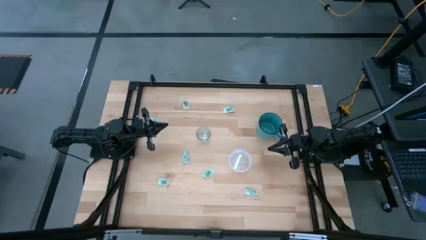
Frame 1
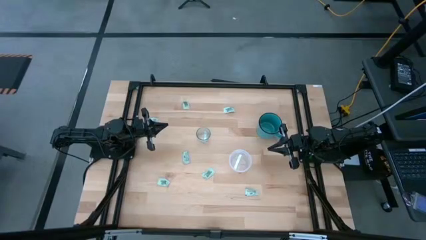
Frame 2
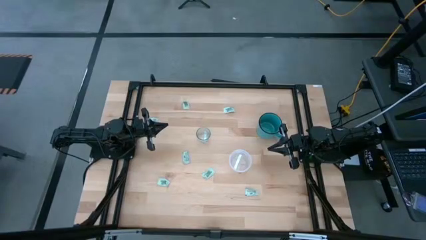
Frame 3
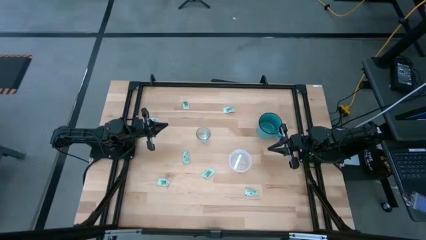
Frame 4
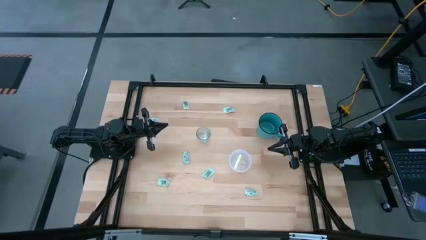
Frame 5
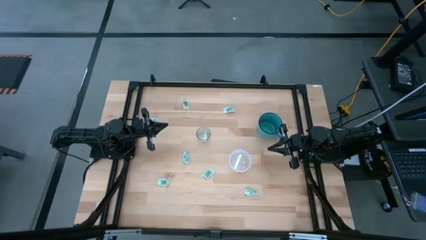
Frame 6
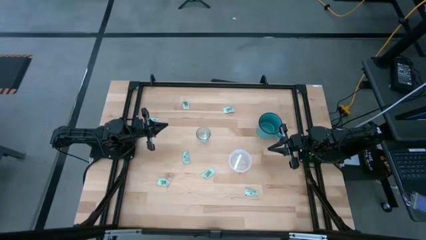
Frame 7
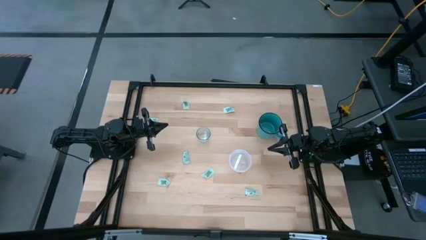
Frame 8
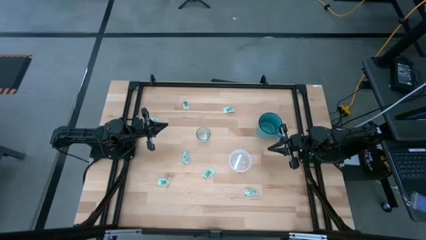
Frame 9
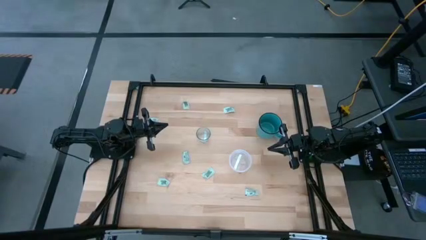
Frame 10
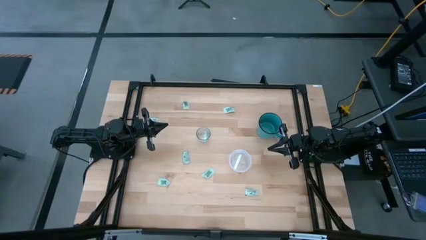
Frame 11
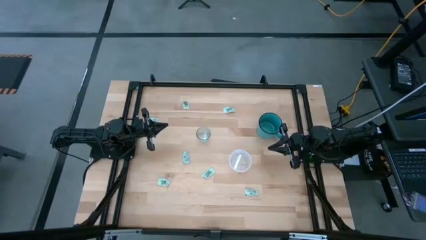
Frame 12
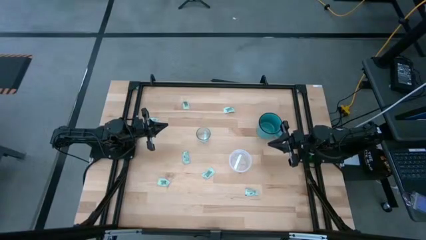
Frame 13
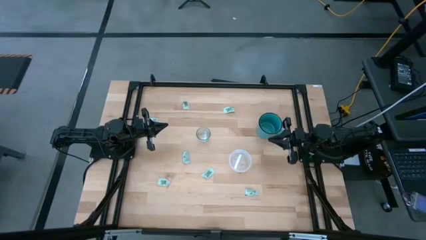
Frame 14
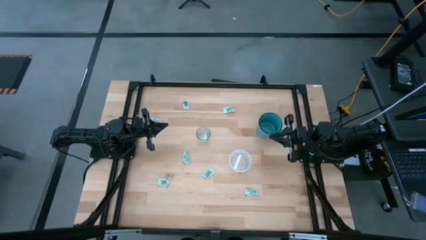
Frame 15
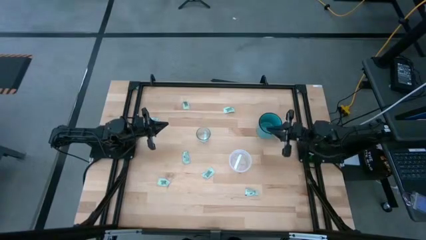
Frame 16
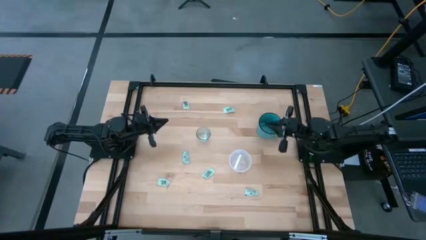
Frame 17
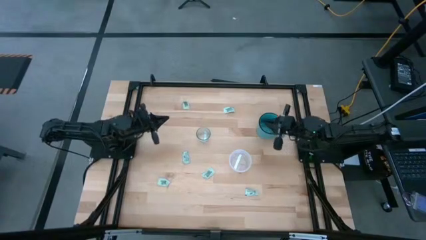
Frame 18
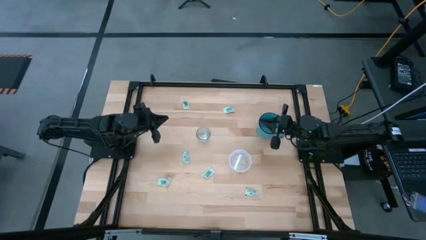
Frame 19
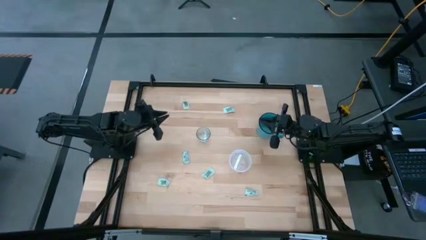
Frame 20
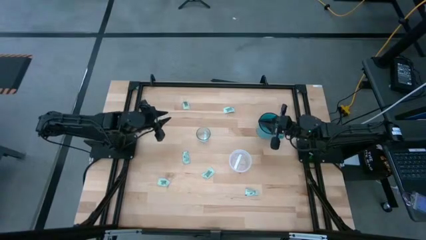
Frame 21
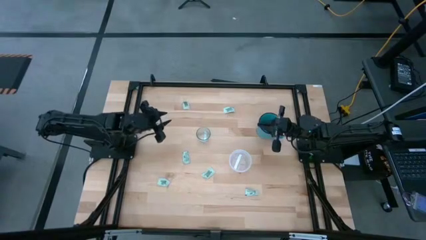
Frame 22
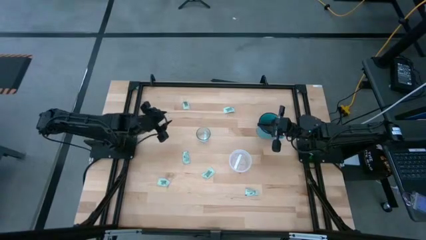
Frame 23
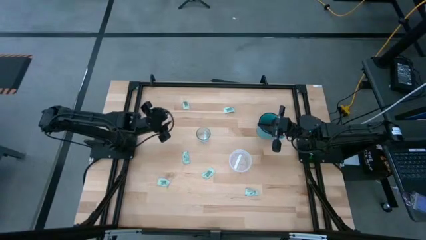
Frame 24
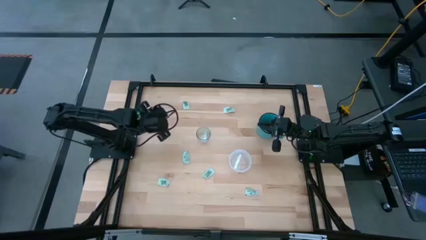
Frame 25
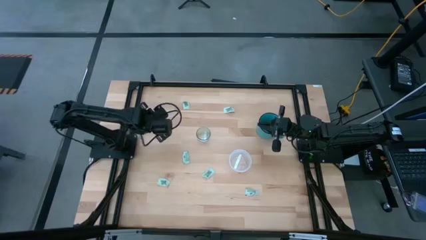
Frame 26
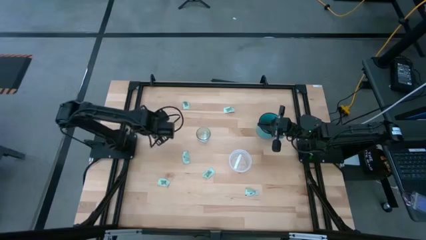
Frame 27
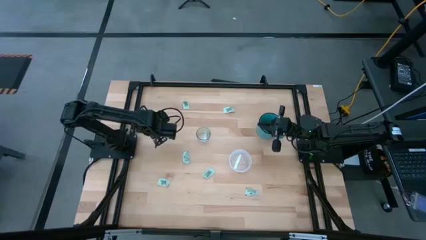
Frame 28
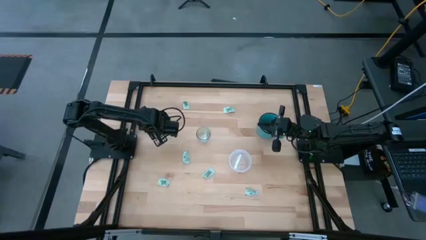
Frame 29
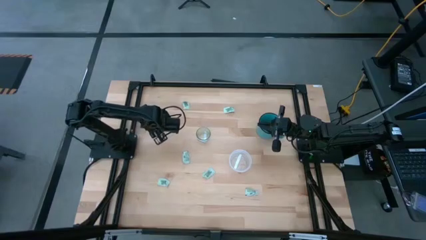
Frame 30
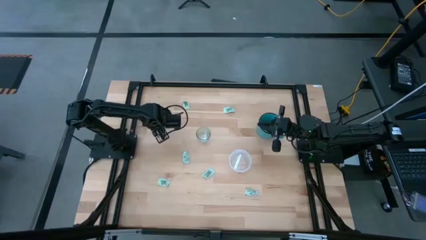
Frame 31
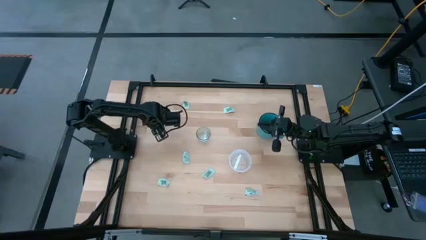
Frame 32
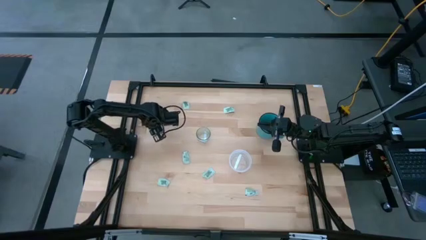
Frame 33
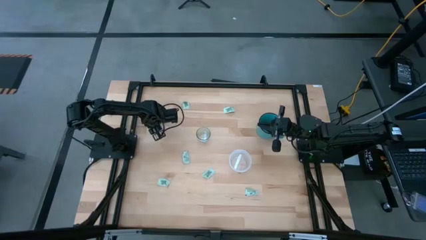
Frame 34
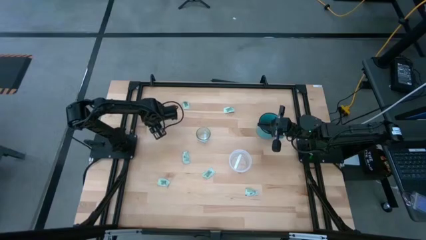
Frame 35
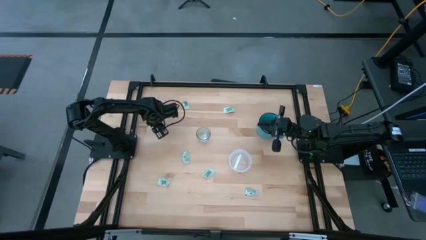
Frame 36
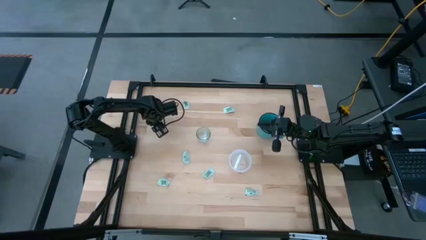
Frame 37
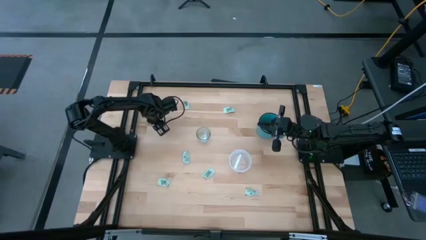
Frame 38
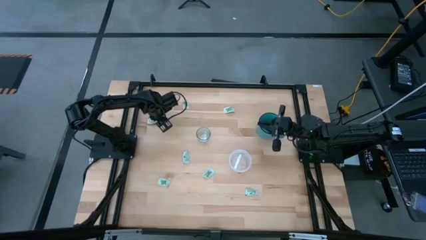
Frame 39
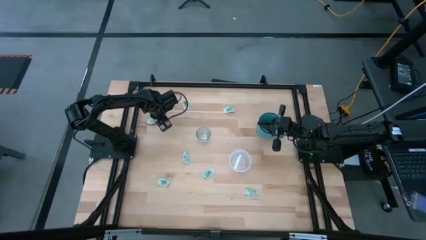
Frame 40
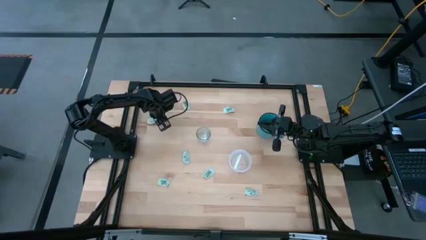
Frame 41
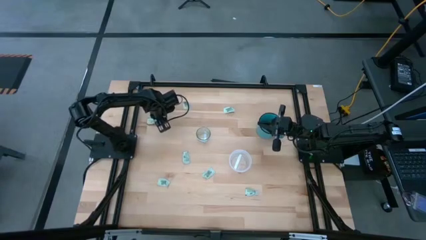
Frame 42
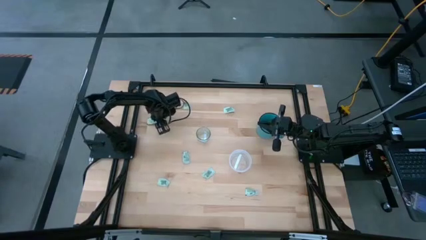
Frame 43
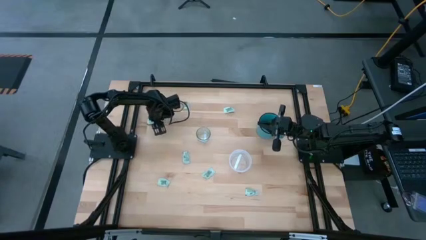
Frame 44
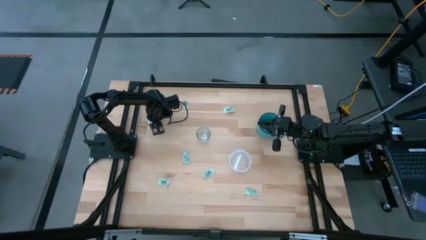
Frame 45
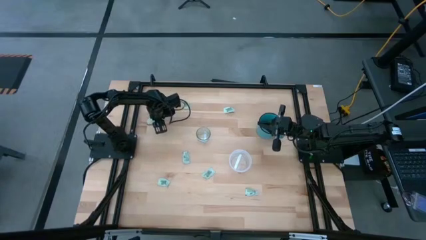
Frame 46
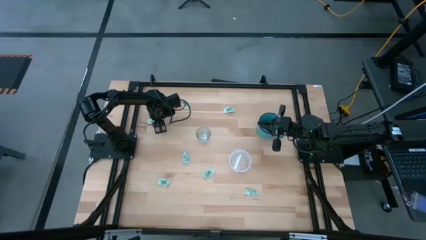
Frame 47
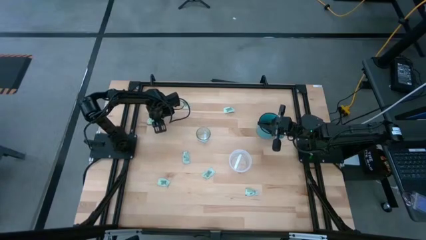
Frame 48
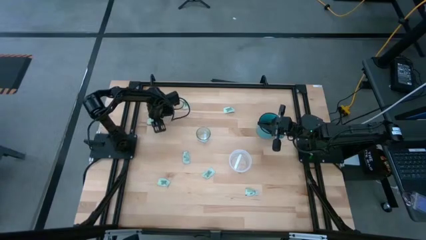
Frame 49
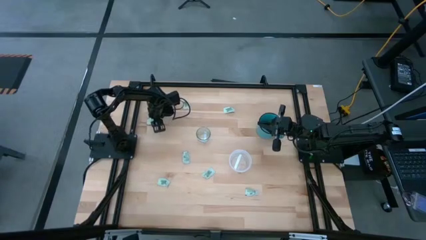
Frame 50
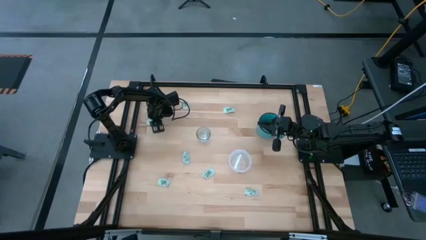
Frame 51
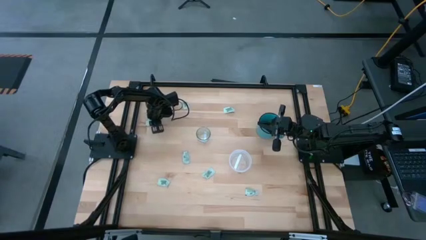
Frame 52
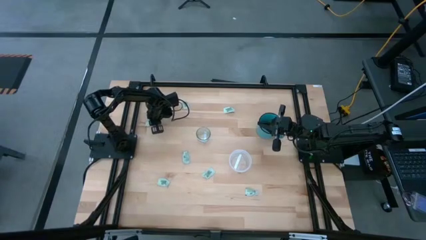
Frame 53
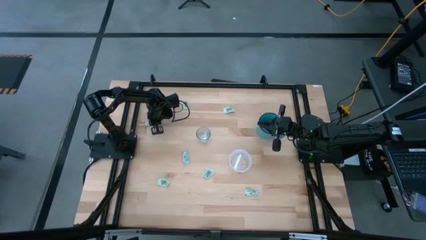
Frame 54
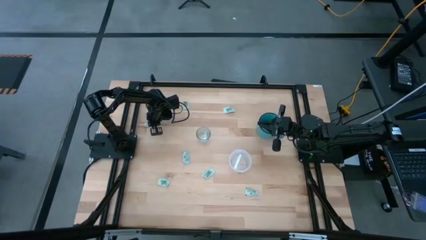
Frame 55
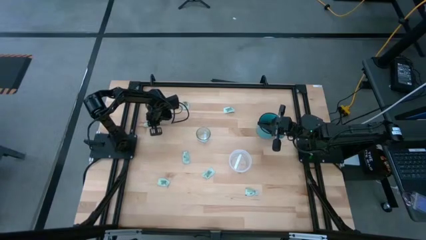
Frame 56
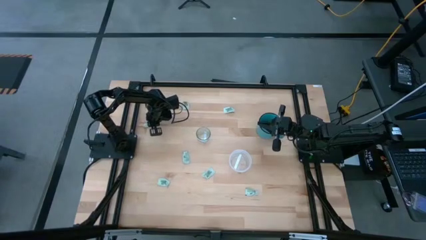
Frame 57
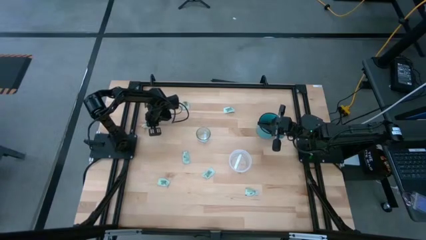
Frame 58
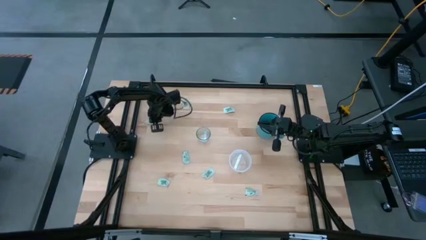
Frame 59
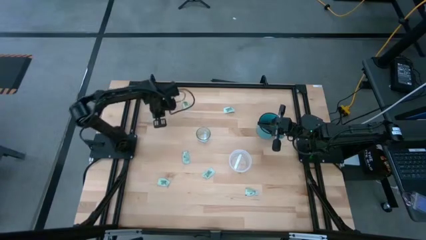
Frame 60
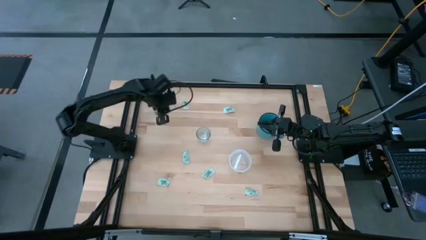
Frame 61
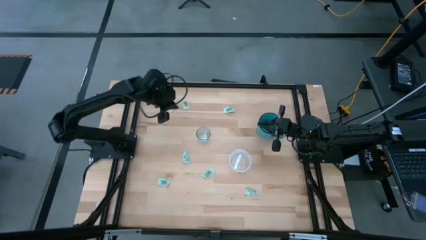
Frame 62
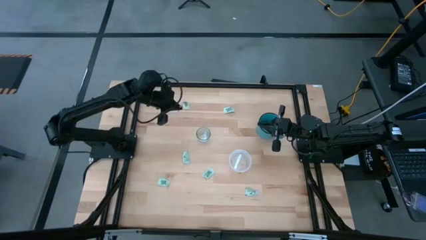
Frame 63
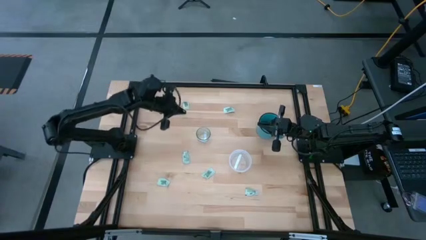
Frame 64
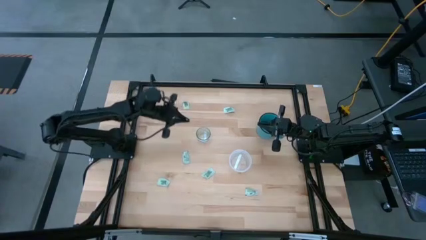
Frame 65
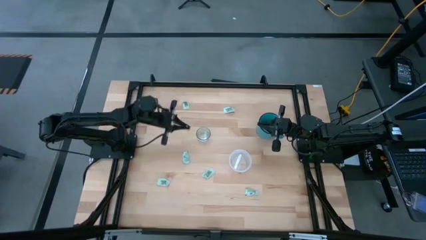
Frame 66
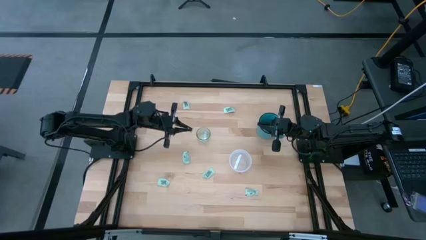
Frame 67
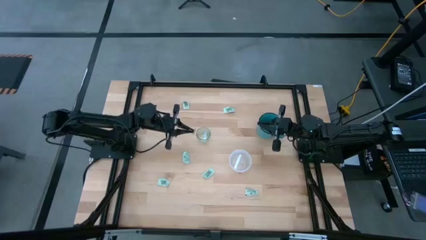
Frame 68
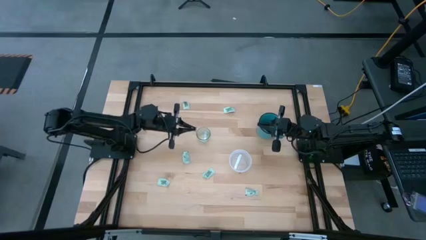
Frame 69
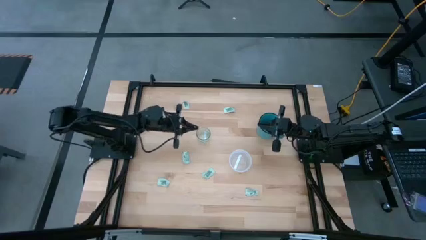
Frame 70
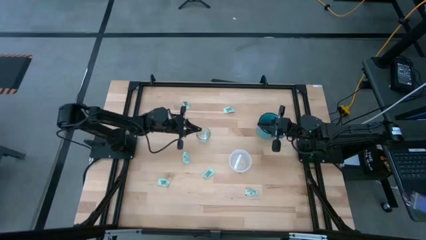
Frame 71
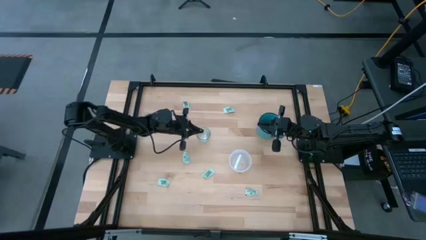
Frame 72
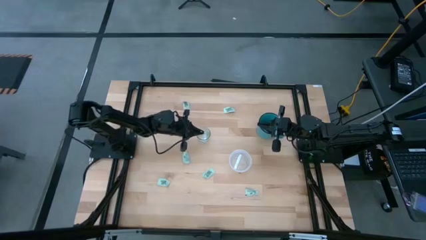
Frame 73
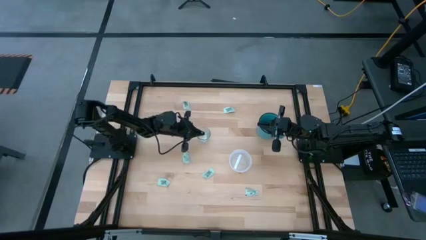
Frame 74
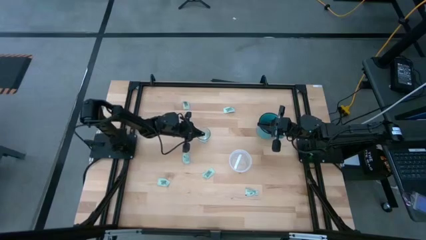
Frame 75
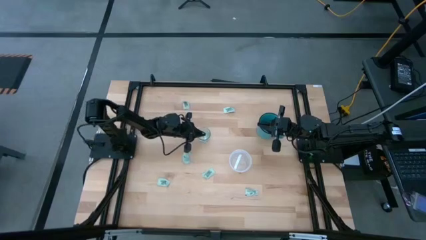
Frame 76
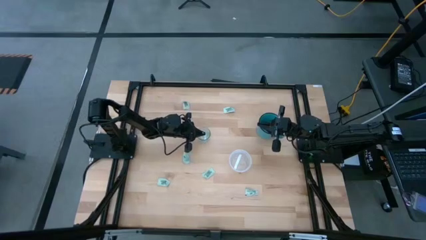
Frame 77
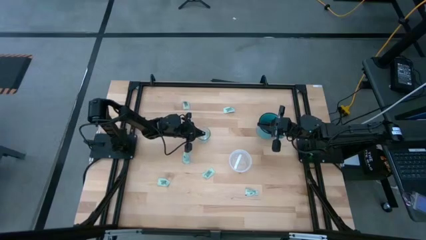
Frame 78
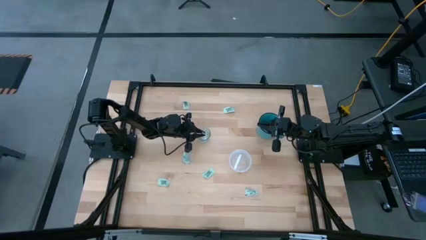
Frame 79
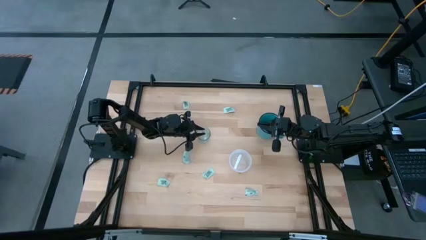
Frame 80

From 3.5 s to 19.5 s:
Task: Pick and place Stevia / Truvia into bins
Put the stevia packet into the transparent glass container
